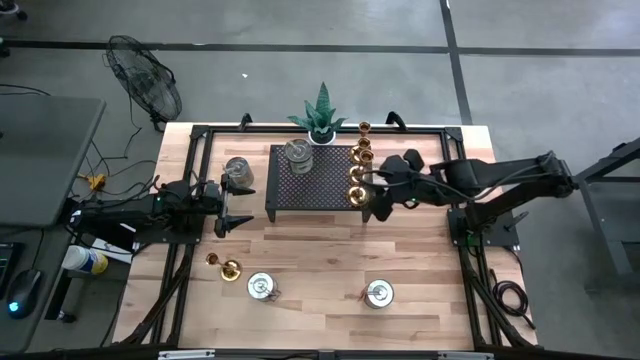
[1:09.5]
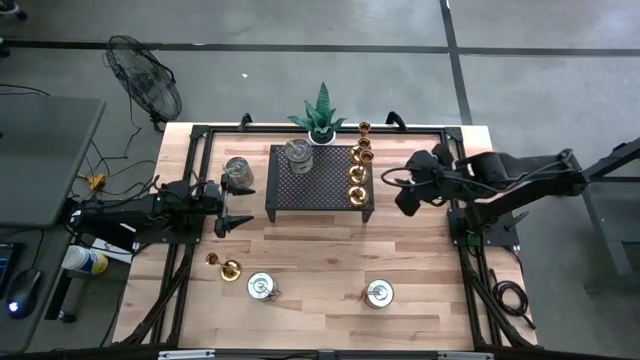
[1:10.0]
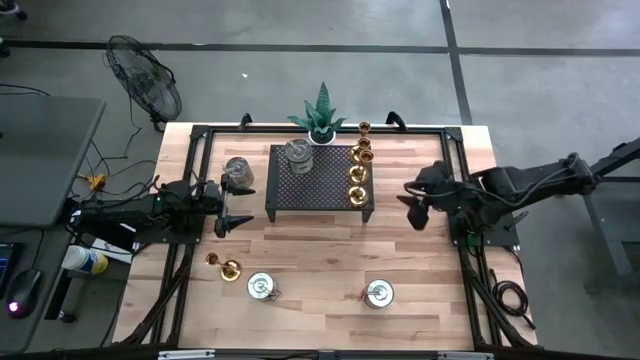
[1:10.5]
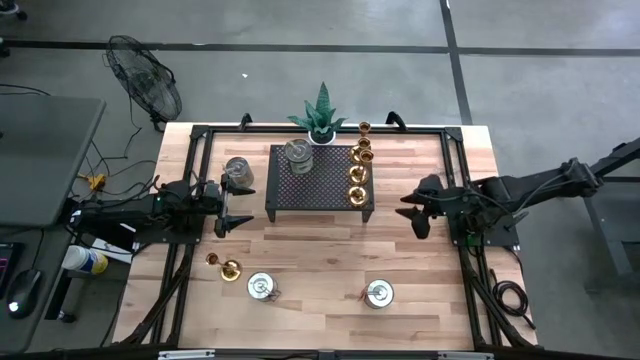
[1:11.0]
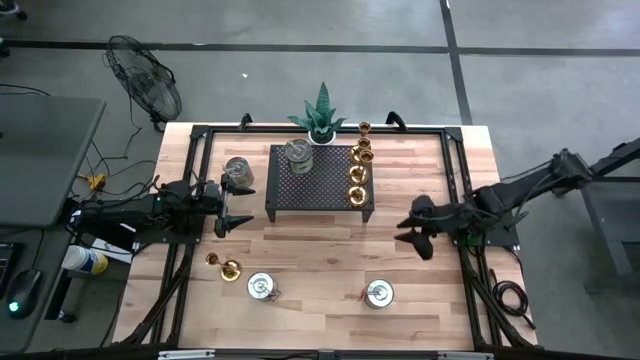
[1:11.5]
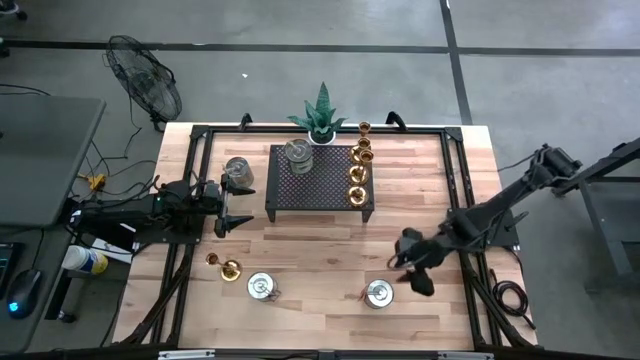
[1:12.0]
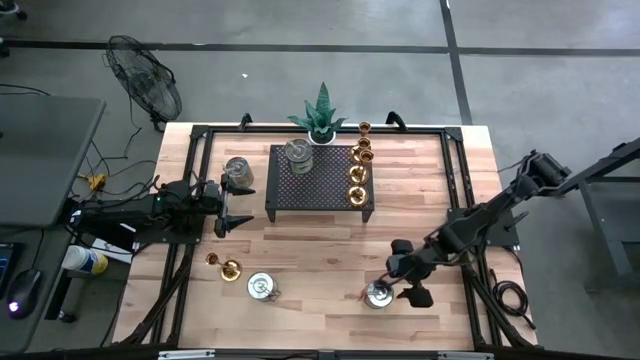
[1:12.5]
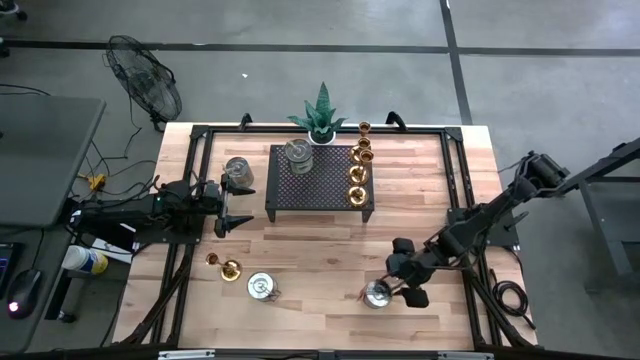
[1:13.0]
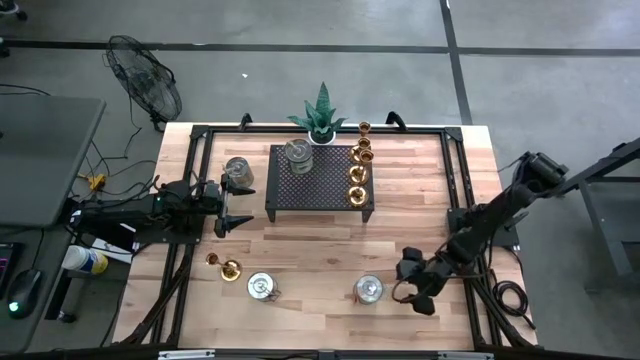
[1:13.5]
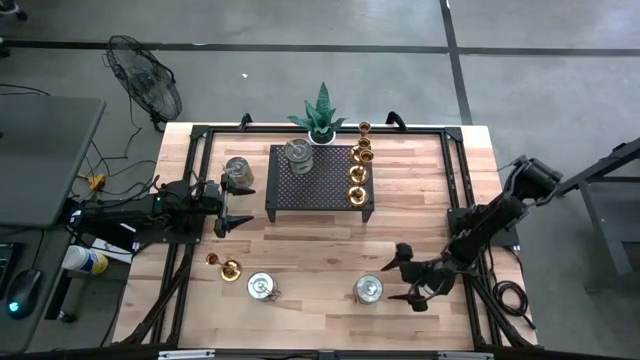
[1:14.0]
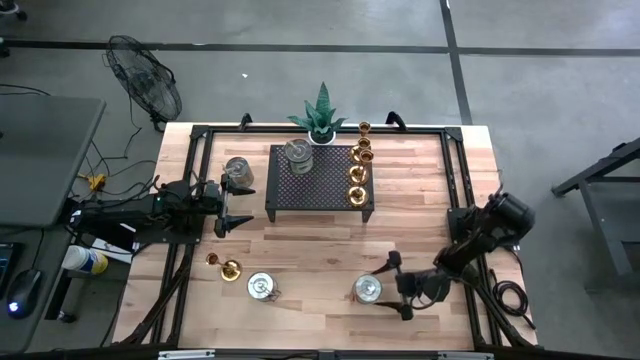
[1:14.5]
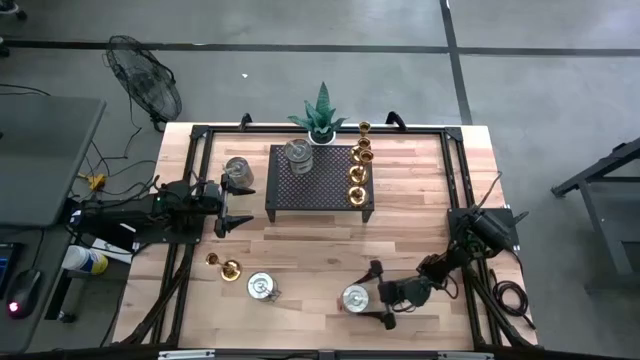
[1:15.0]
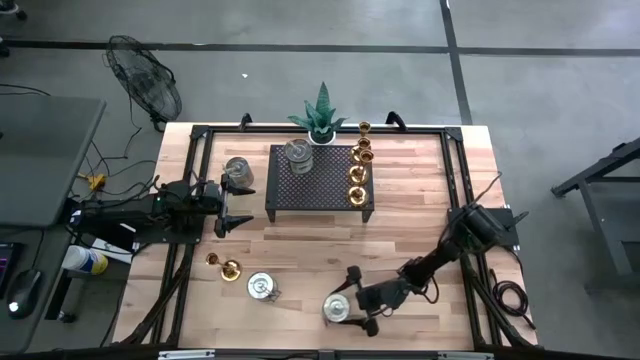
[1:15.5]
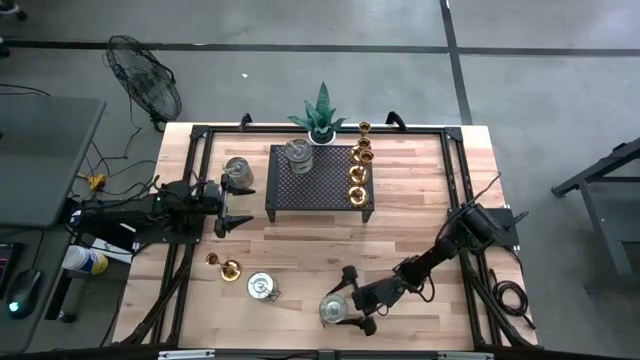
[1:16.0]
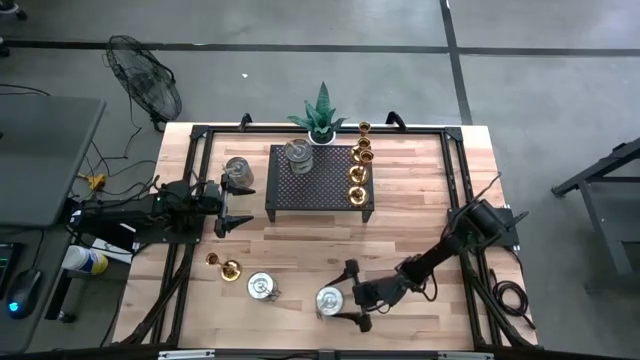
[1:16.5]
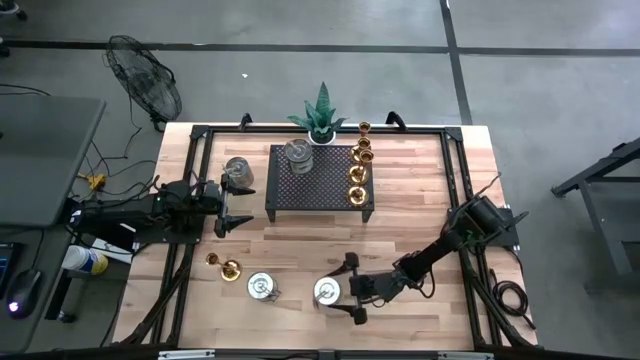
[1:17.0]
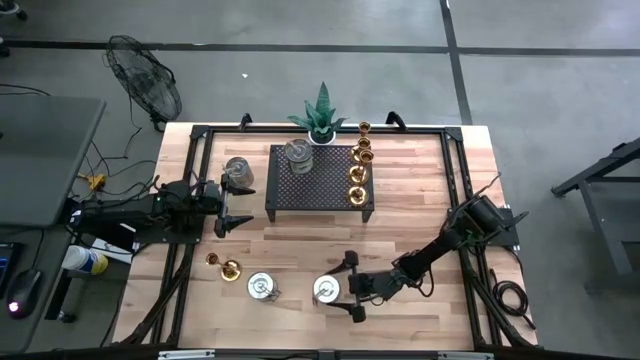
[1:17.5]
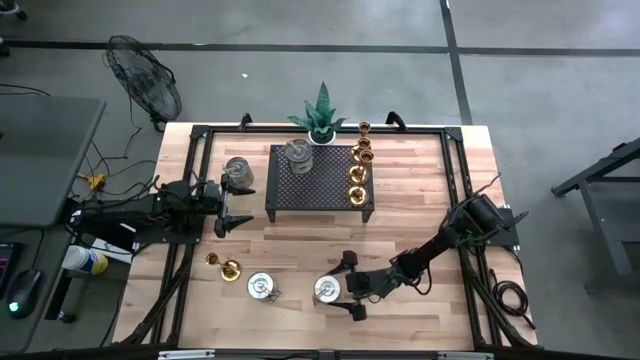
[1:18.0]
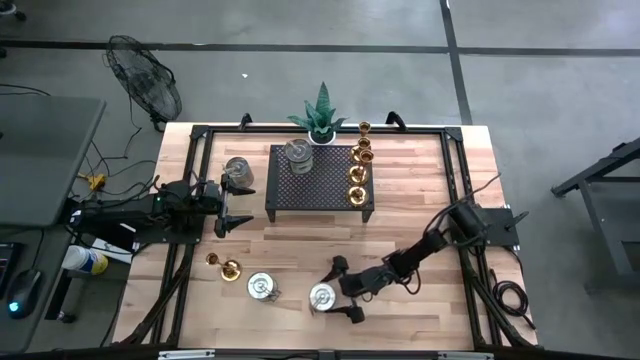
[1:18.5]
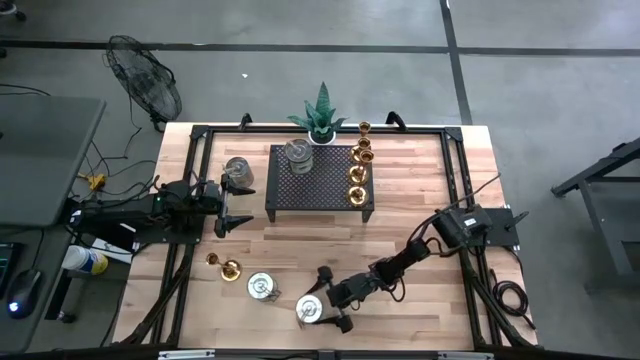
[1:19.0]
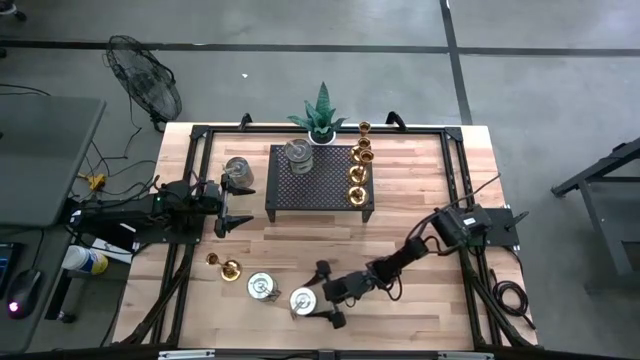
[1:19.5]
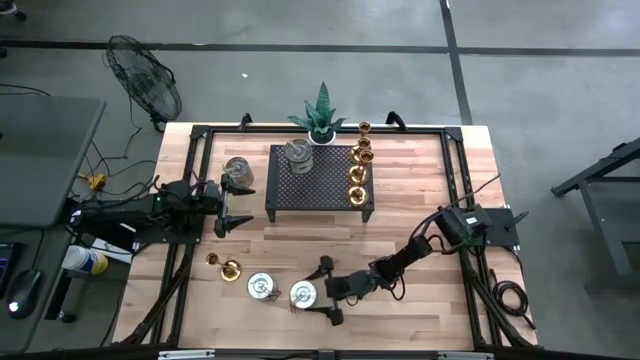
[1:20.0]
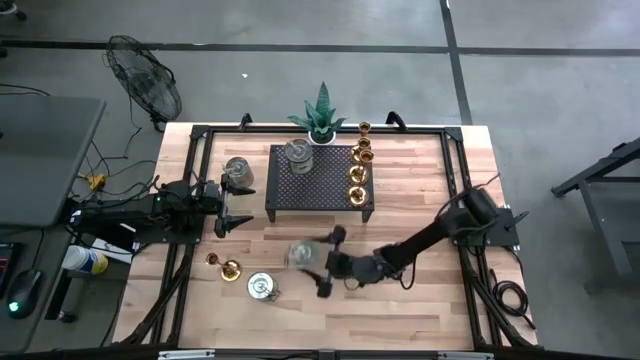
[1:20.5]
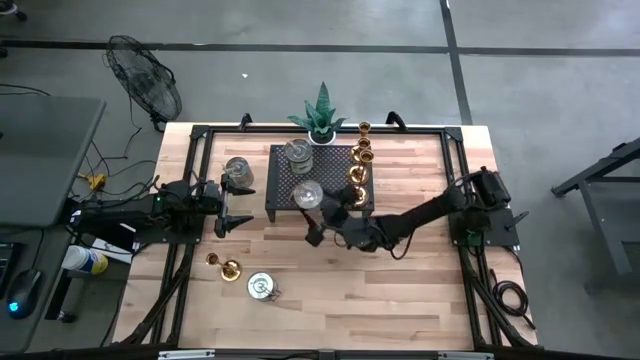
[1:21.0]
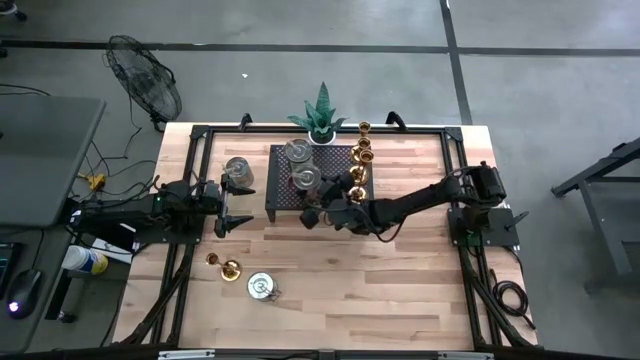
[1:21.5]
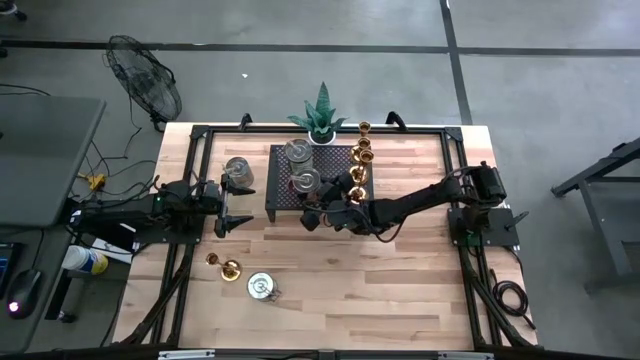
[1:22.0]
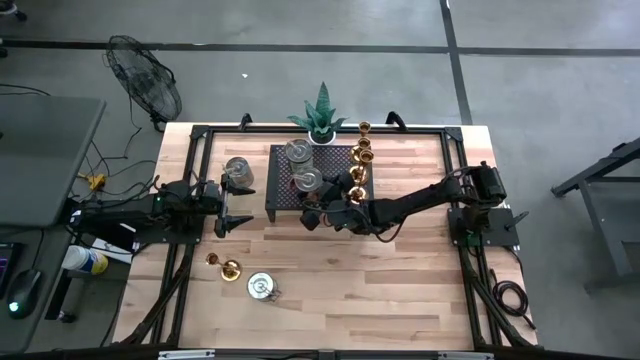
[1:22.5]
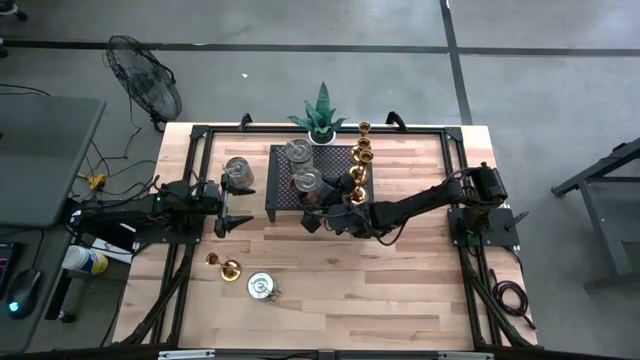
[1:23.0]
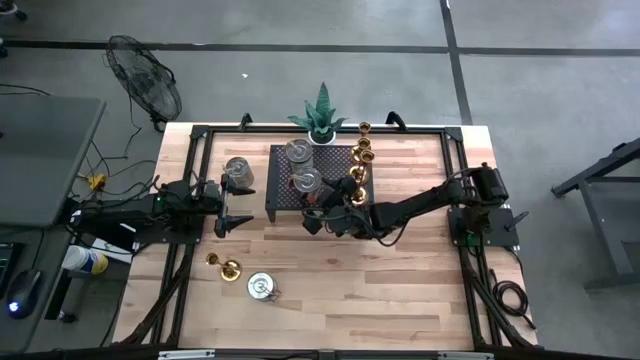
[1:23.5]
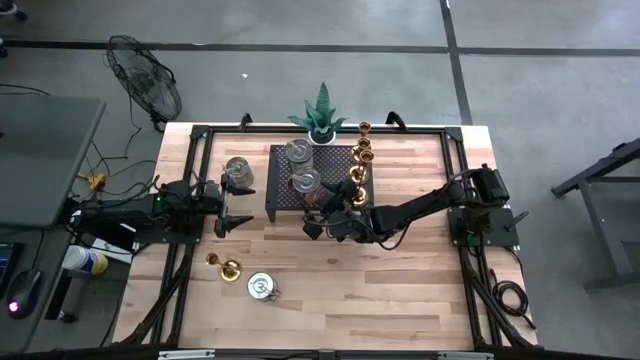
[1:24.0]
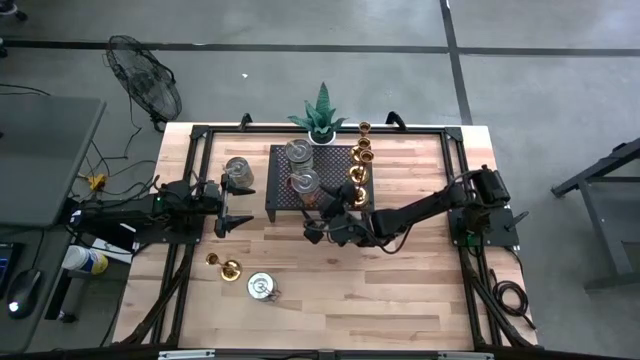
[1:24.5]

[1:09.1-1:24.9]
Task: Pick & Place candle stick holders
Put the silver scented candle on the shelf

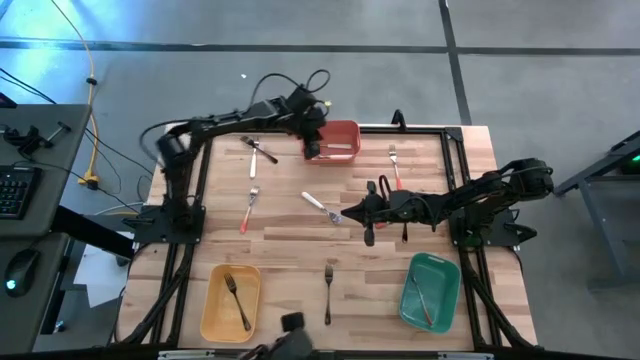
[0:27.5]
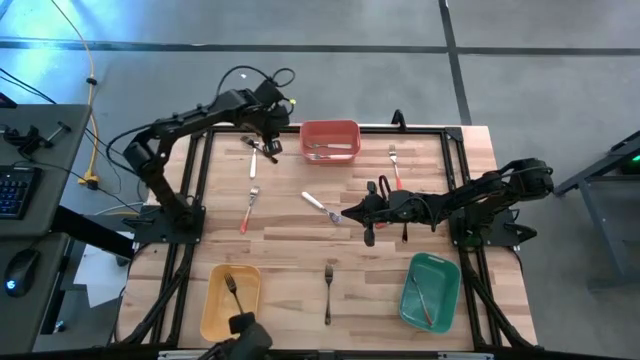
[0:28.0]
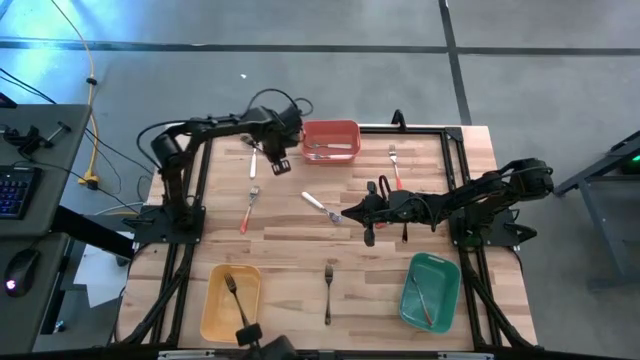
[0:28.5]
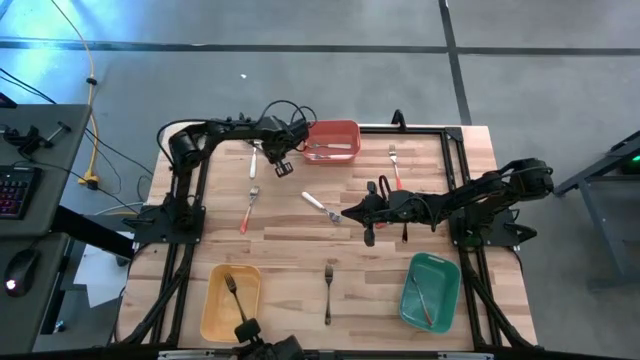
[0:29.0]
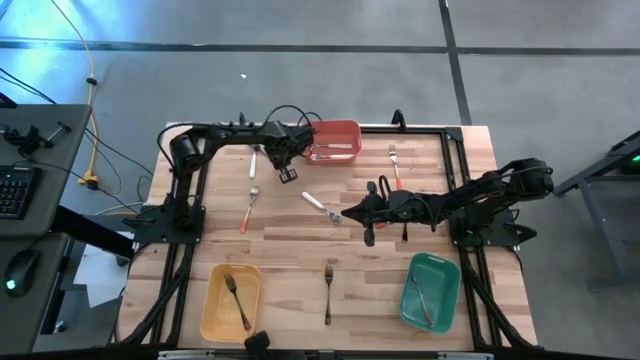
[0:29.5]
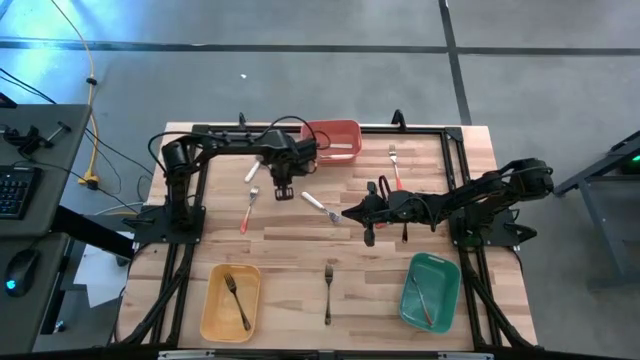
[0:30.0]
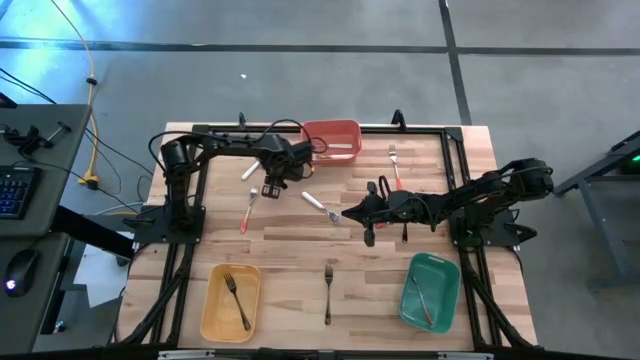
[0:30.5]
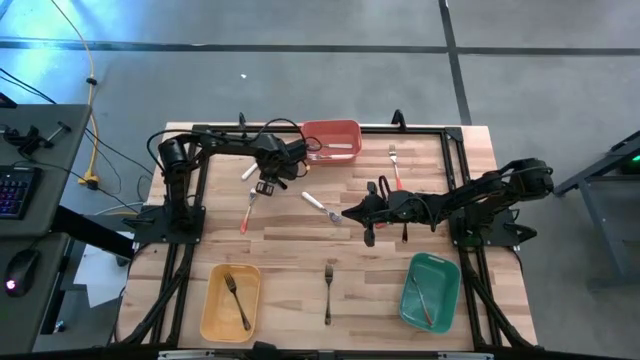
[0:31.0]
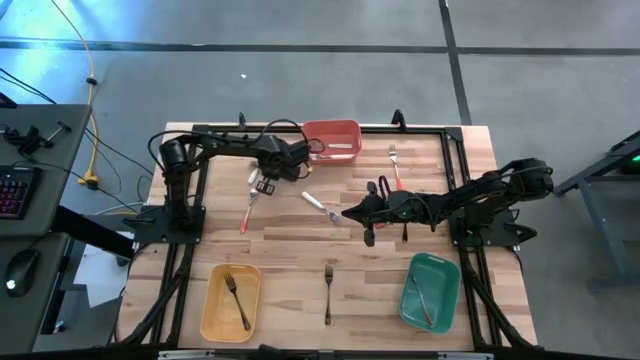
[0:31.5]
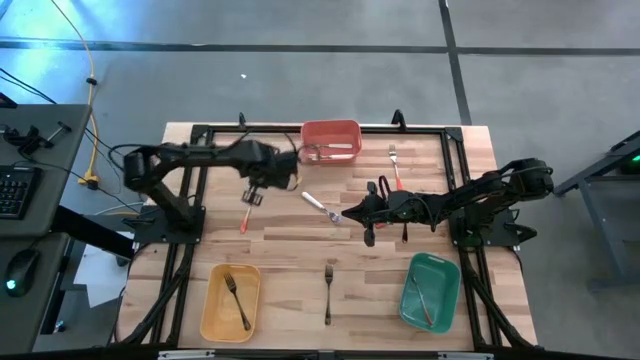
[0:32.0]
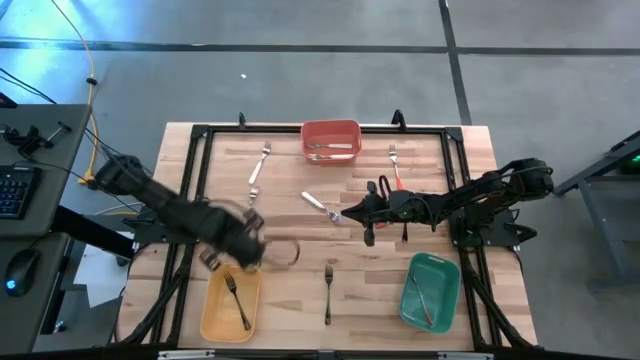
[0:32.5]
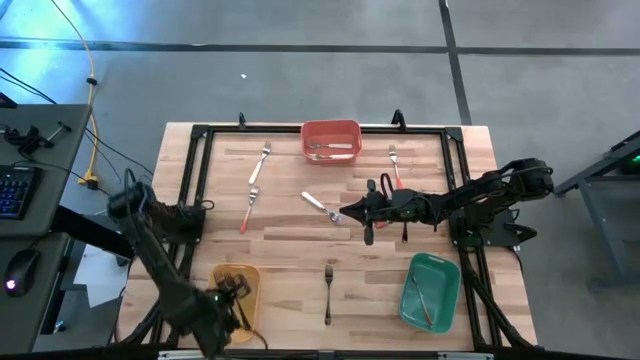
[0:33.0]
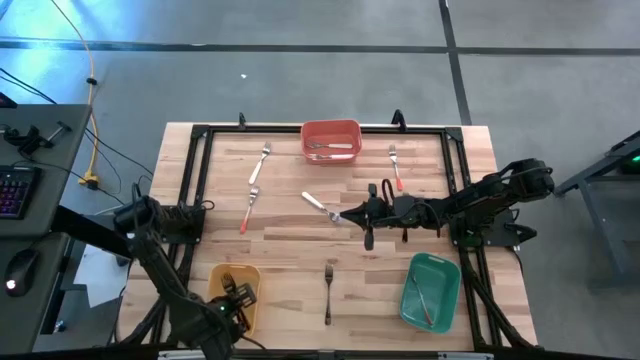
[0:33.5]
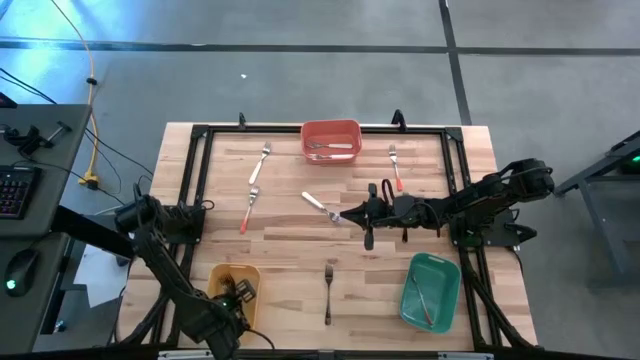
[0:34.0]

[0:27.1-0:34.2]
Task: Sort silverware by color (type)
Put the top black fork into the yellow bin
